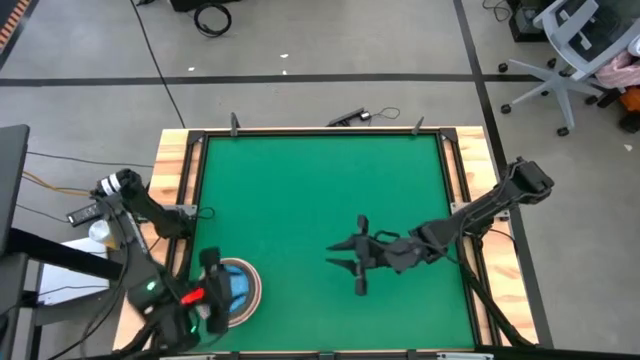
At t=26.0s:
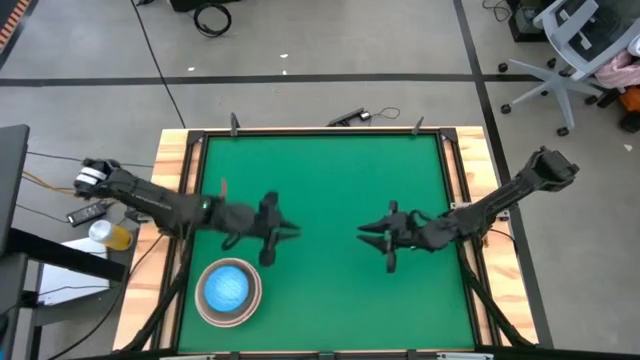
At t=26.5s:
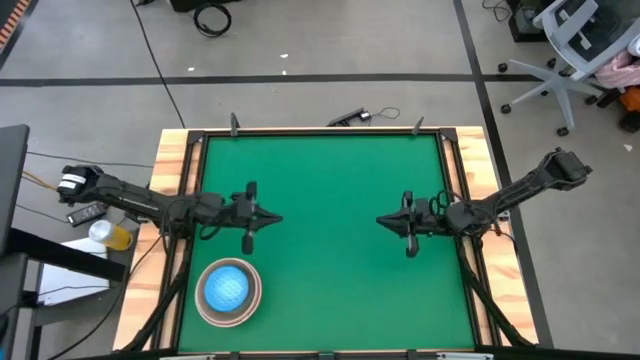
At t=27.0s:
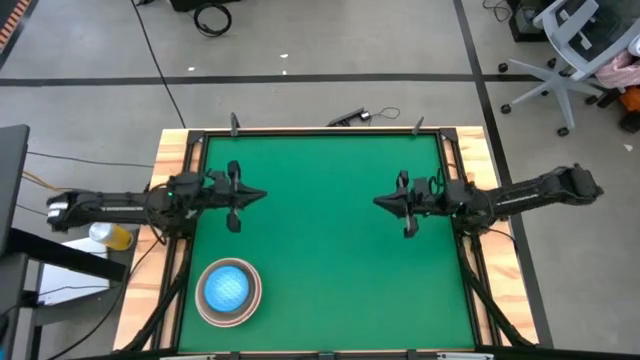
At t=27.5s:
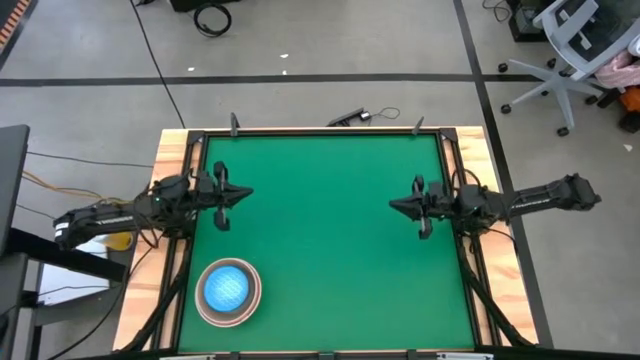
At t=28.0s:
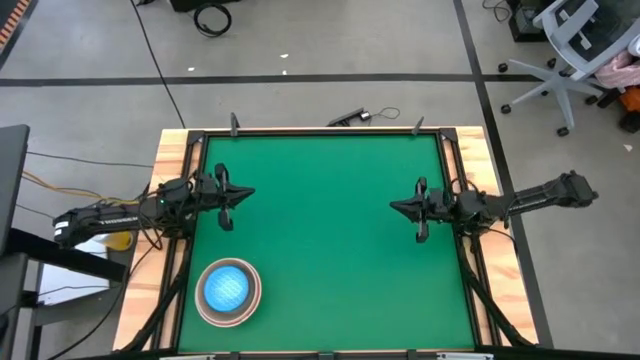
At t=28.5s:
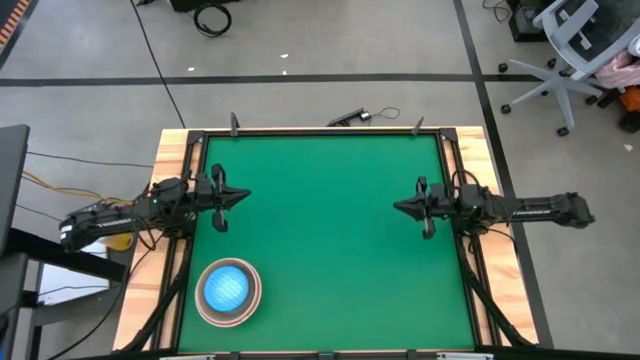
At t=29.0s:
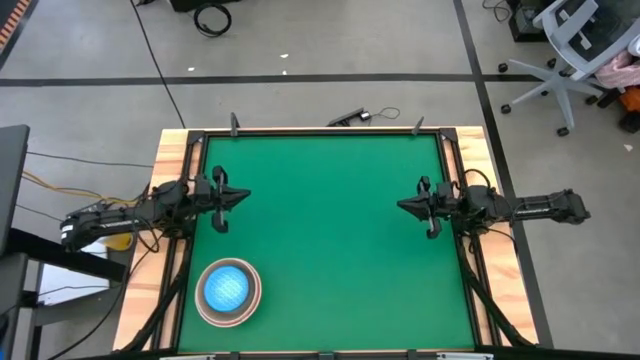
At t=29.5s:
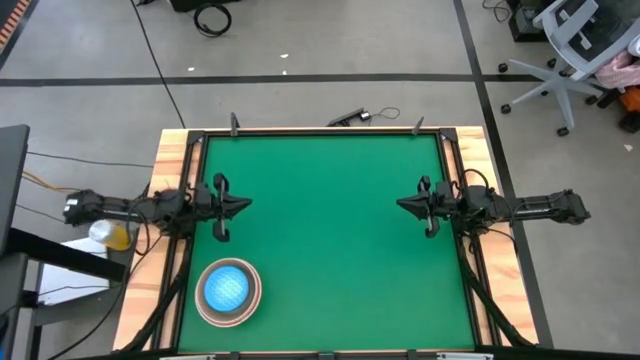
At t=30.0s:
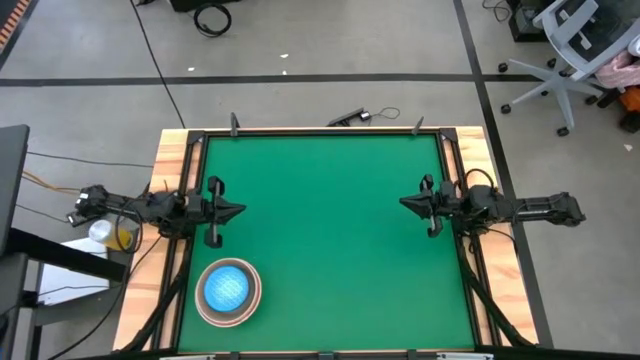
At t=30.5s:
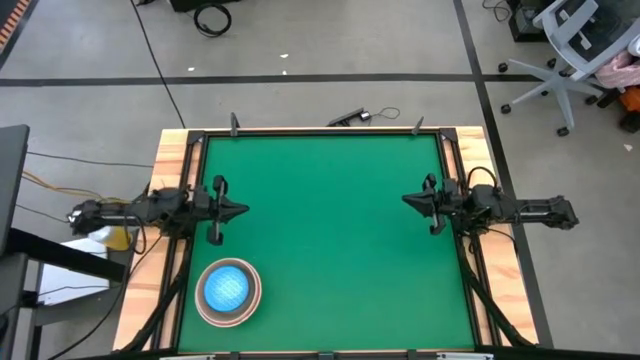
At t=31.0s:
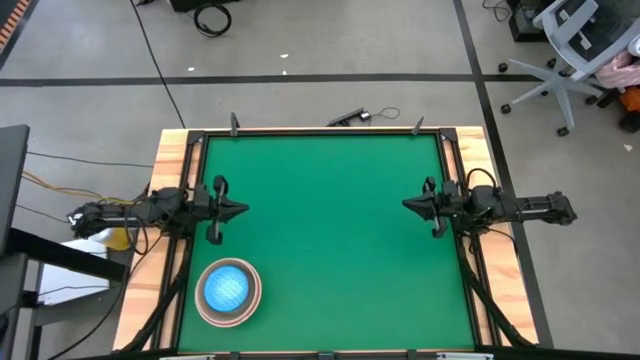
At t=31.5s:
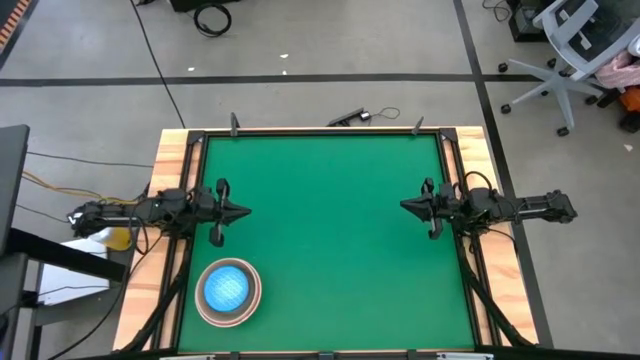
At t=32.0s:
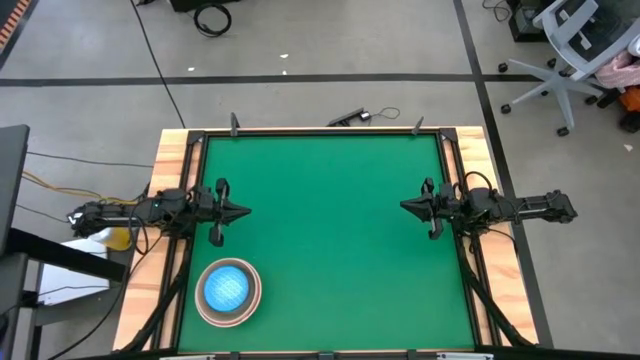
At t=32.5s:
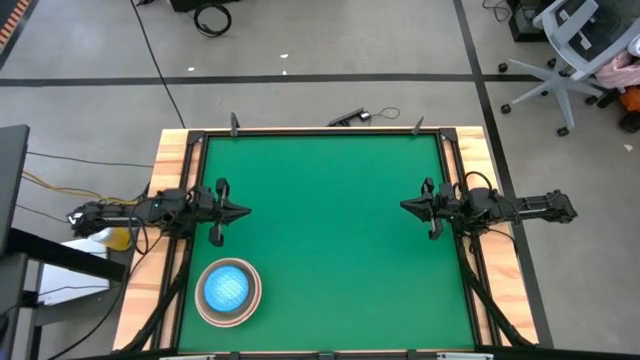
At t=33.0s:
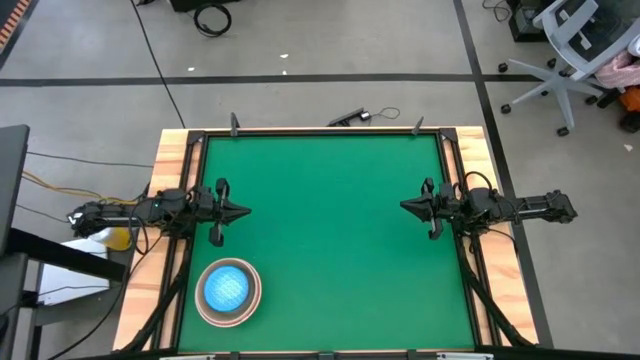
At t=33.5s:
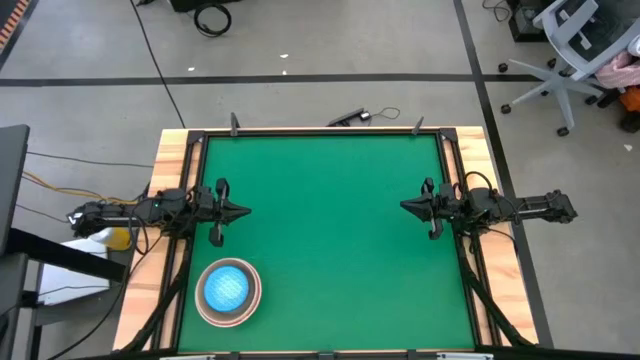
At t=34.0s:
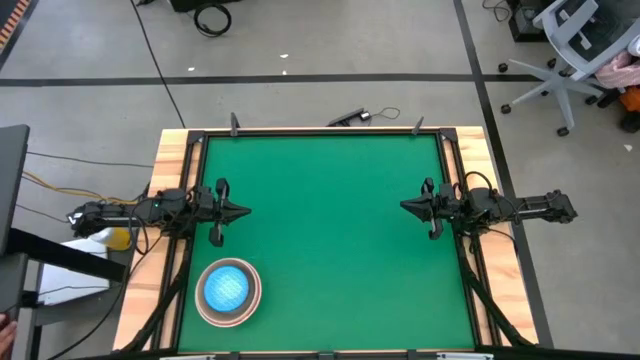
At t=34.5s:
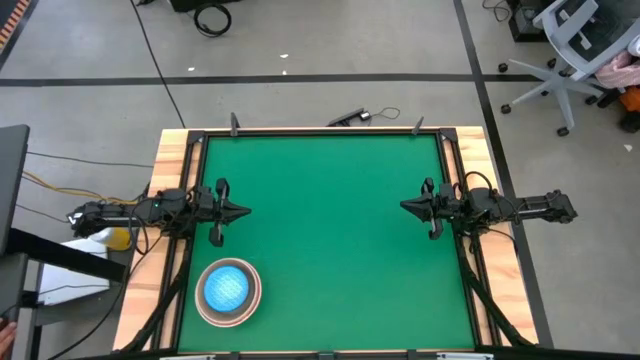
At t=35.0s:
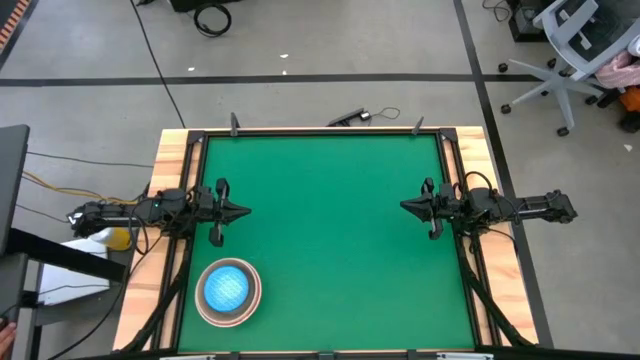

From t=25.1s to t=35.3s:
Return to Home Position

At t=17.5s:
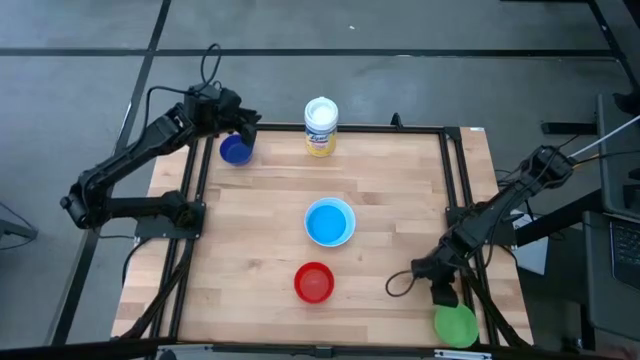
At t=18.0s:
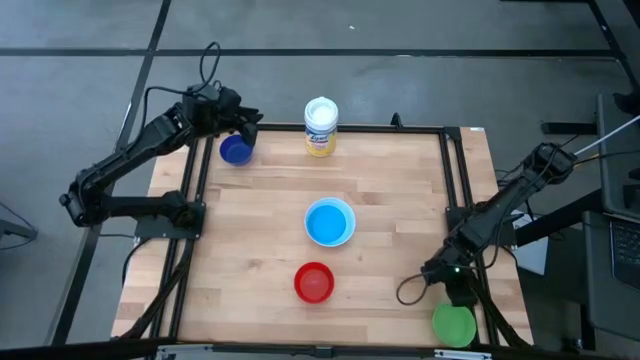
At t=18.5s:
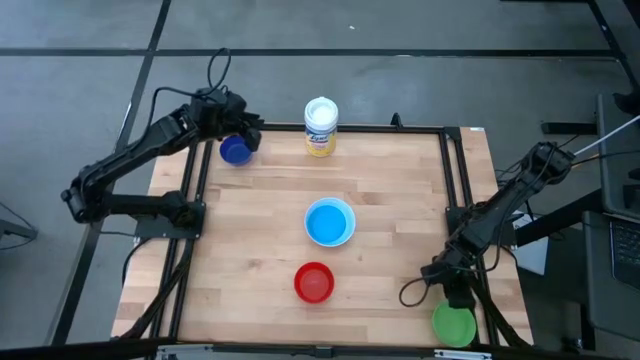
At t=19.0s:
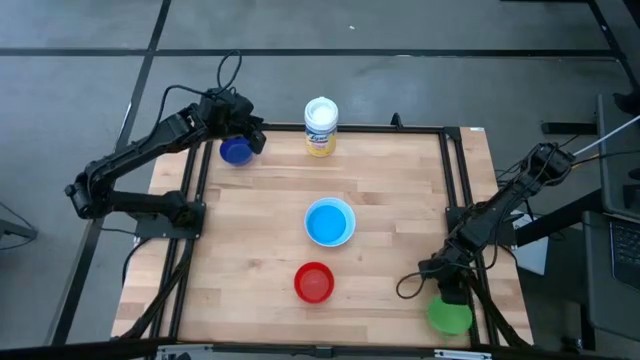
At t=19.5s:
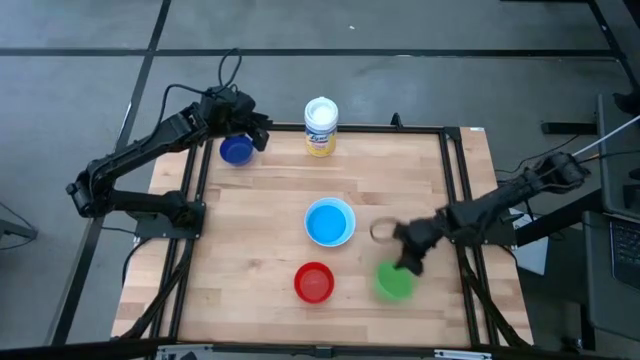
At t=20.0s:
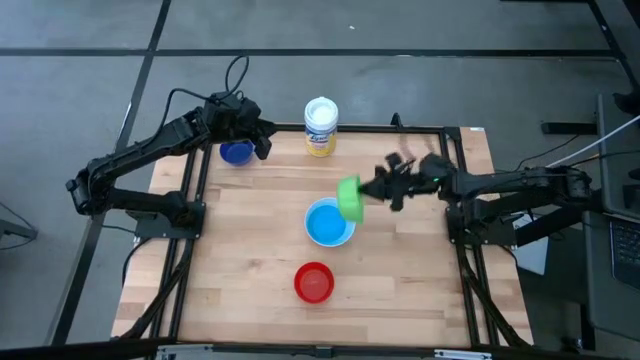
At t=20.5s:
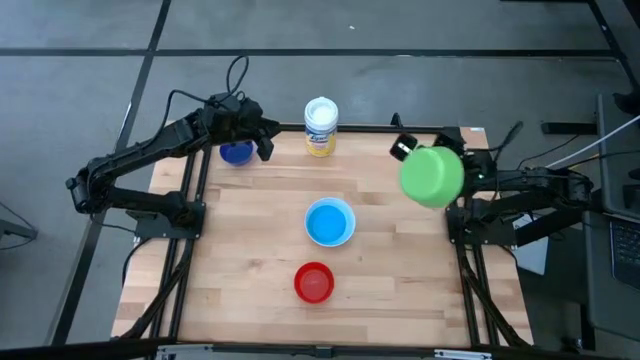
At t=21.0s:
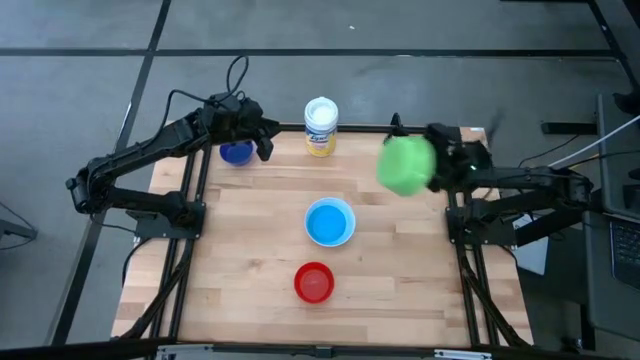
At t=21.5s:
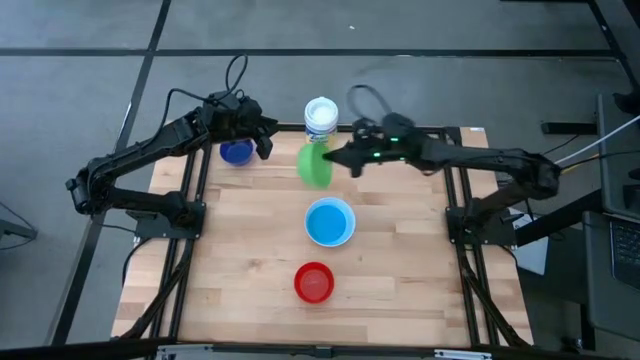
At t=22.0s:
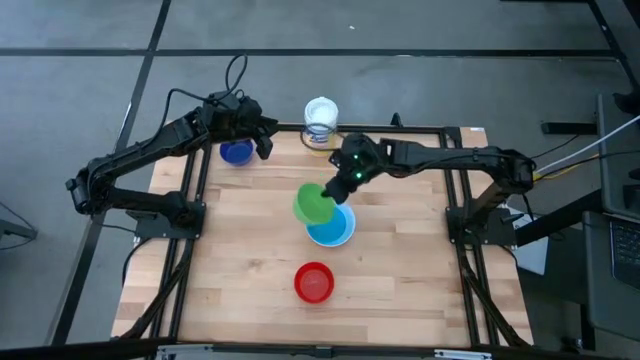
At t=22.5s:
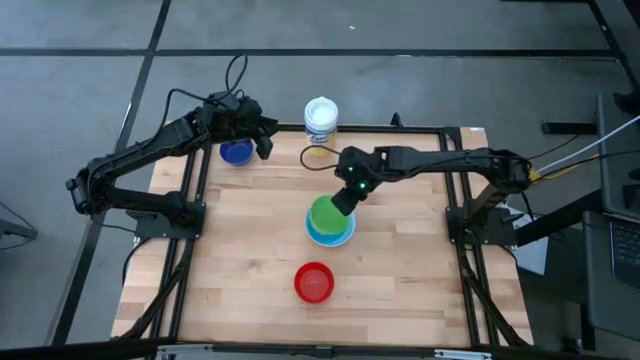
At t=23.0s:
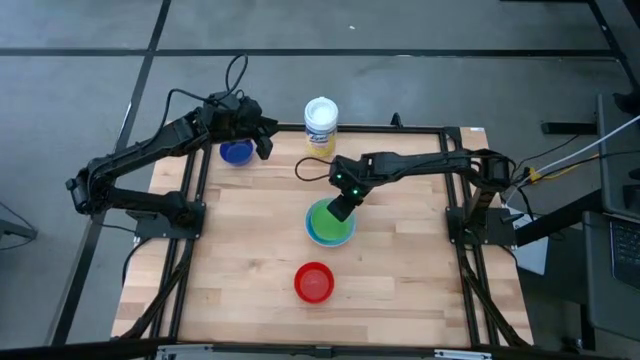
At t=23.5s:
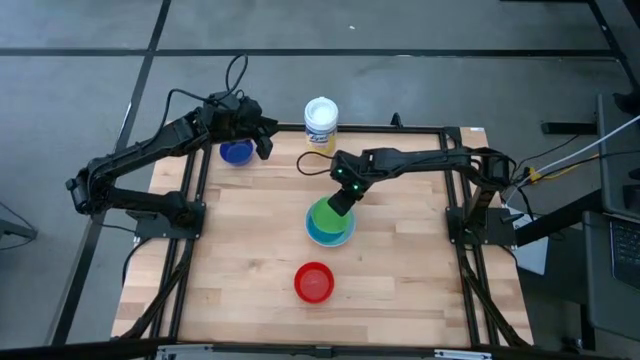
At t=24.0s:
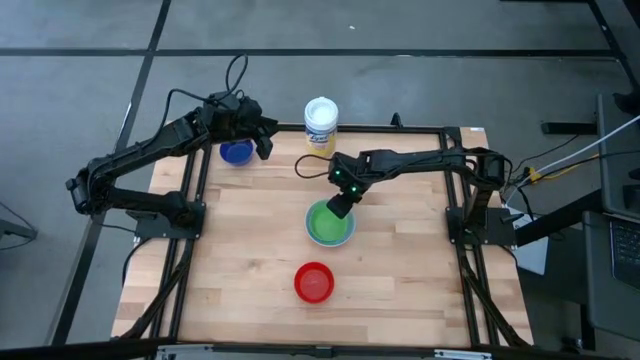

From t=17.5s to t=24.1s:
Stack the green bowl on top of the blue bowl
